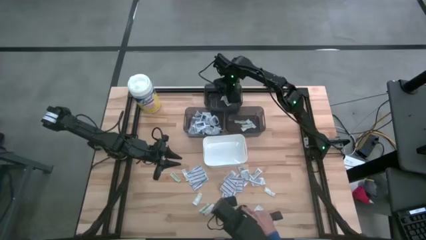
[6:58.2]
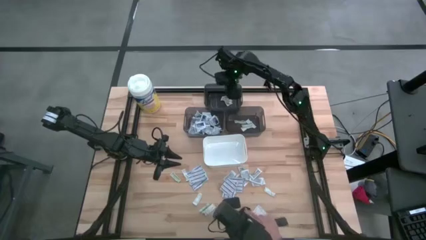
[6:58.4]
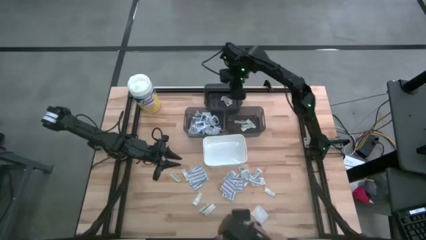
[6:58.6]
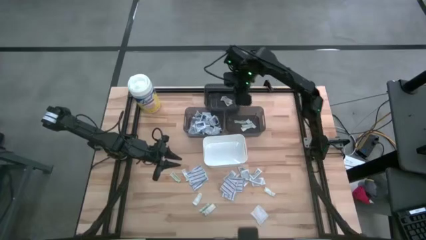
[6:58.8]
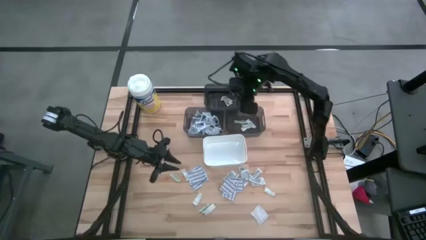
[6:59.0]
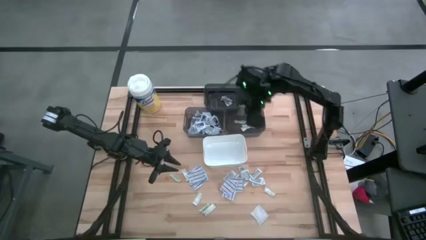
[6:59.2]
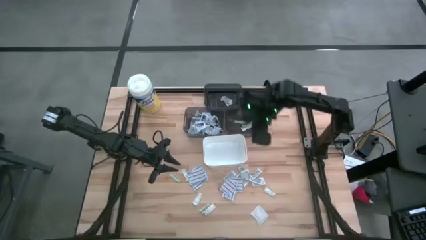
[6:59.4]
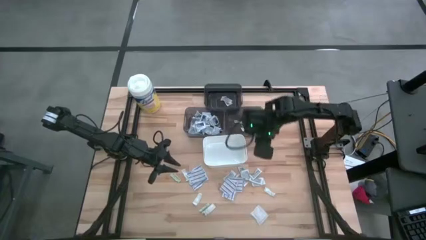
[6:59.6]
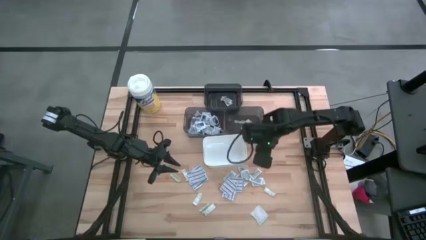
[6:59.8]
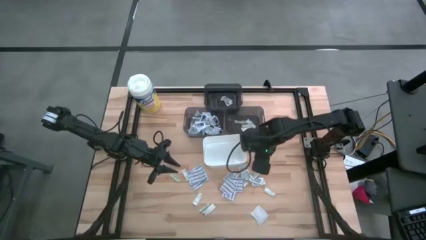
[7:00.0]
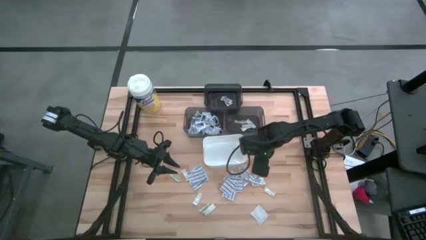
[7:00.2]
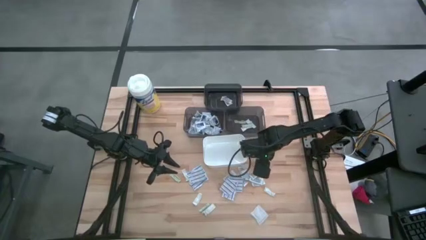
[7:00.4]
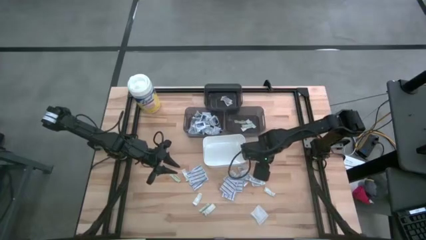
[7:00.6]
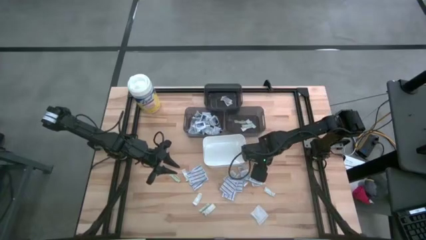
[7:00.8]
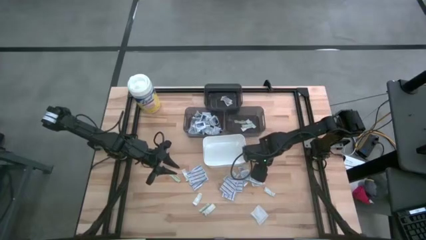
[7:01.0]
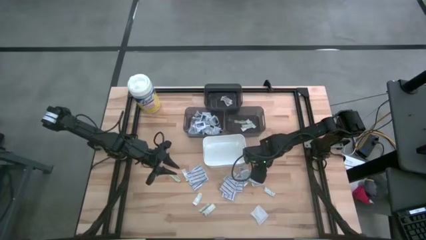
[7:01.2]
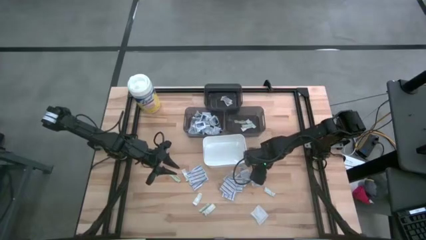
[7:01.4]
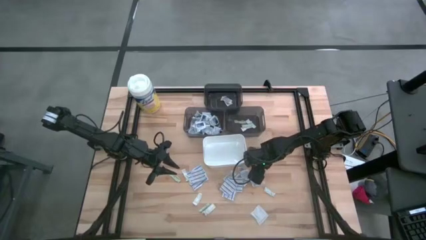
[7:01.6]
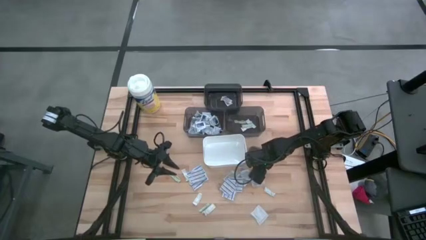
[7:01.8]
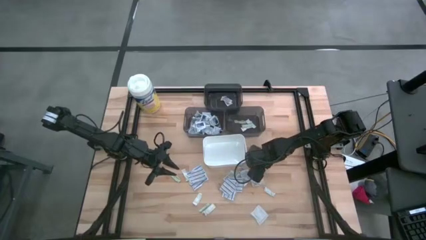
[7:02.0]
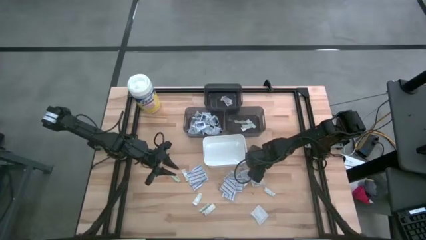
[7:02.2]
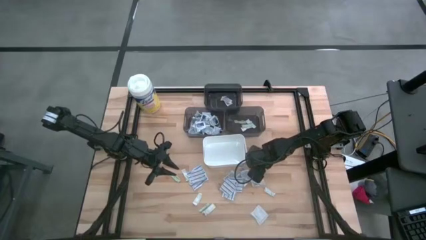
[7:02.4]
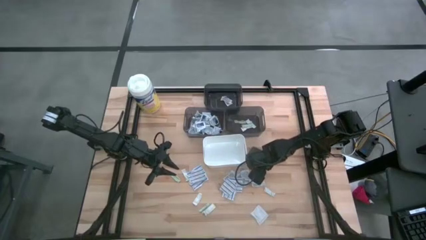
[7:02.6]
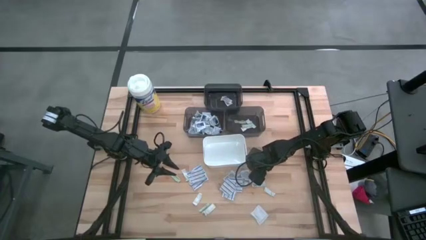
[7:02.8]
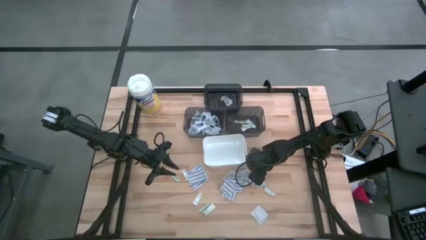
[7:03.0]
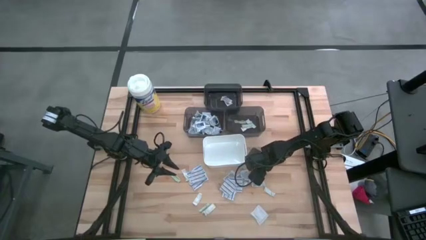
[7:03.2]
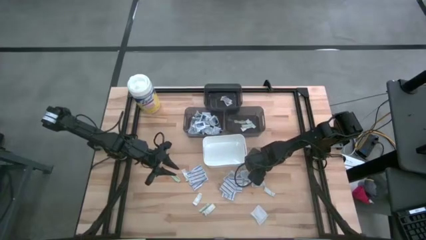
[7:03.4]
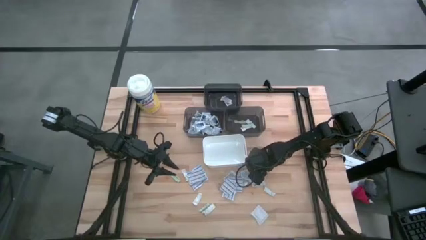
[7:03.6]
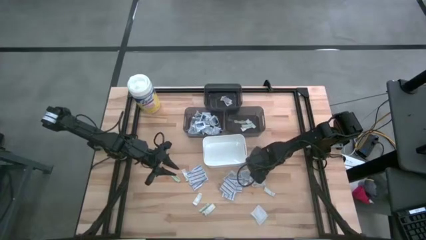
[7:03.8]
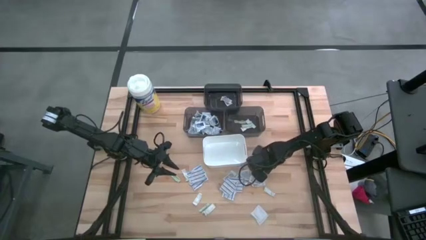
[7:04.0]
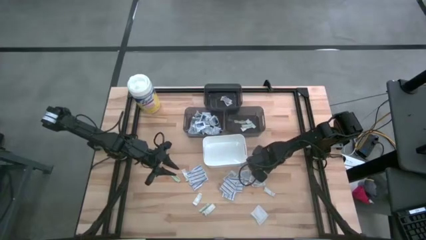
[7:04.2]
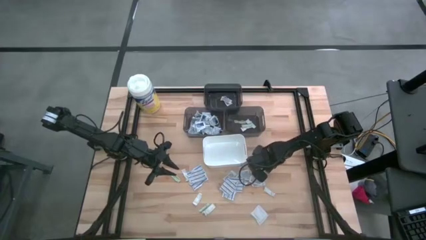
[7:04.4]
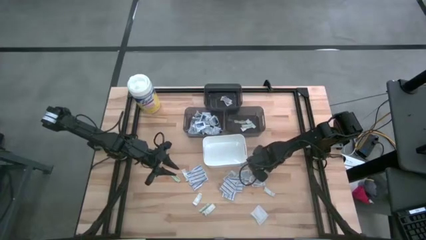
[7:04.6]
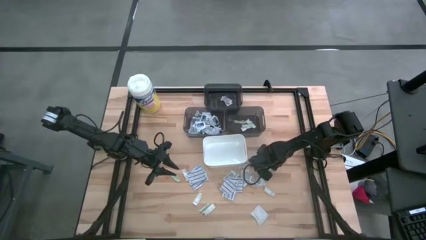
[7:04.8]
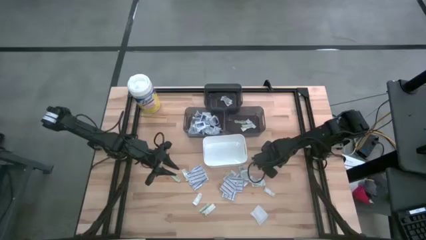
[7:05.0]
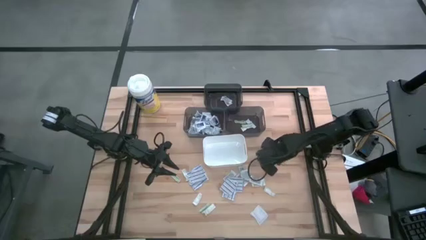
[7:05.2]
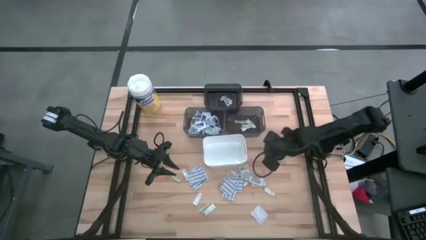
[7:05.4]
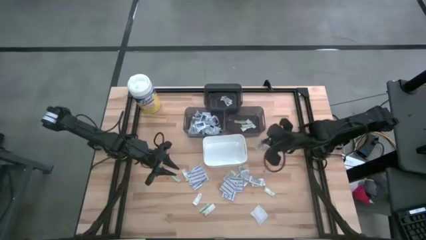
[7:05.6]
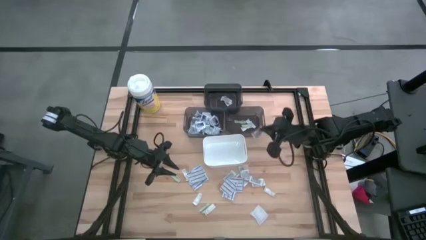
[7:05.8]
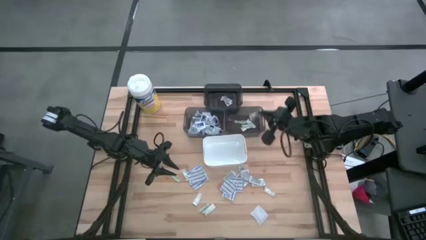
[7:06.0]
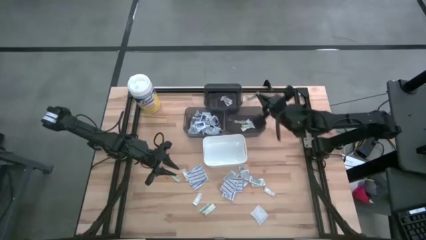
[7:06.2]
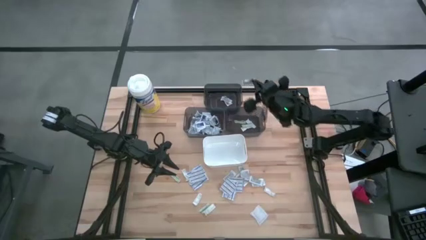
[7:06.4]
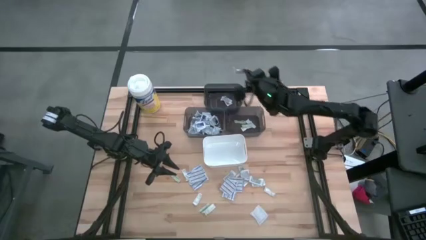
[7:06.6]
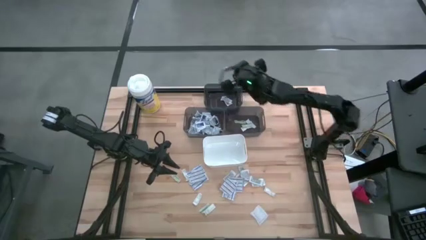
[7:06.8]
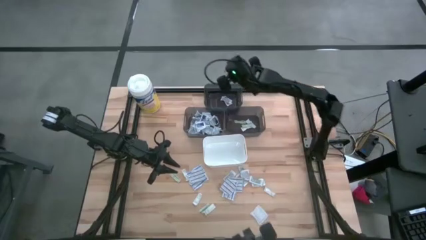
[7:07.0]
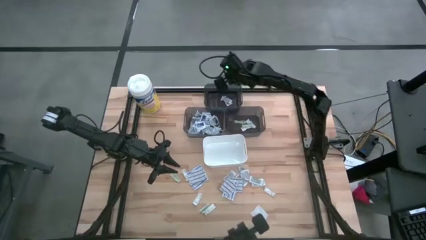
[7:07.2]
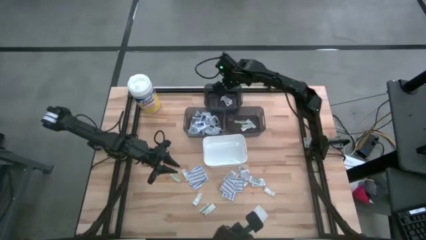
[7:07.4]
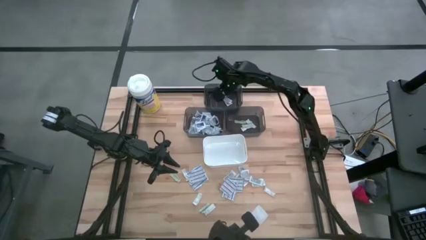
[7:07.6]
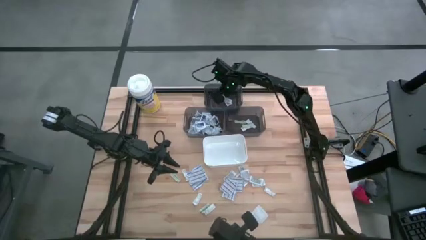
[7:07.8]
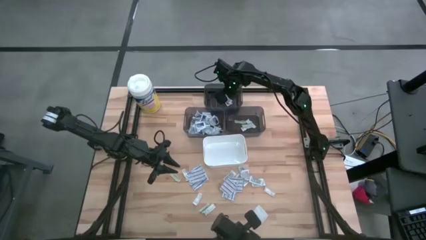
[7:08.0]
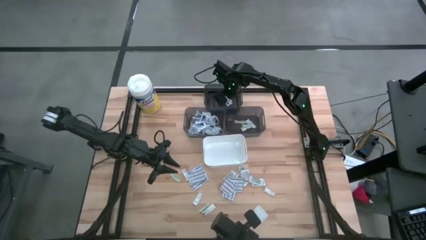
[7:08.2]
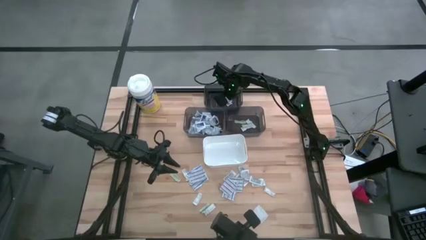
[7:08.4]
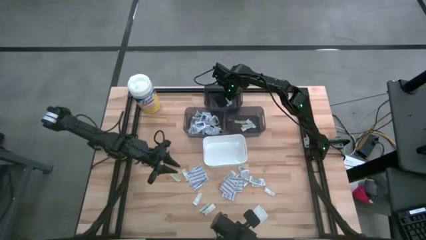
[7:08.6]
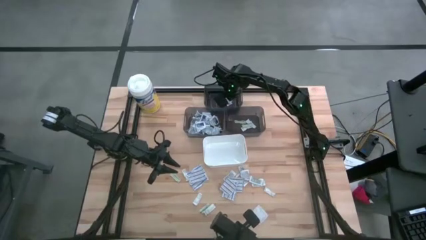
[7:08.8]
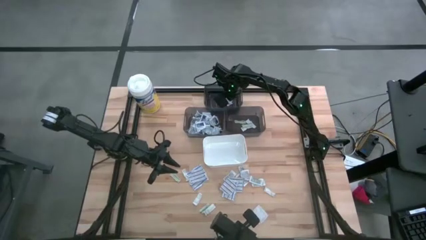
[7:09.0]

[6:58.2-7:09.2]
Task: Pick & Place First Aid Supplies
Put the ointment pack into the top black bin

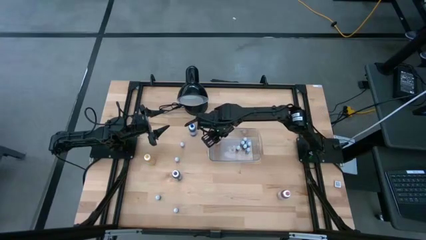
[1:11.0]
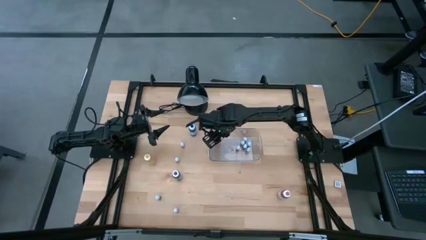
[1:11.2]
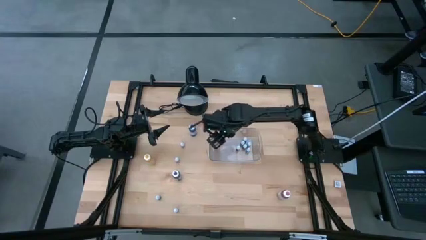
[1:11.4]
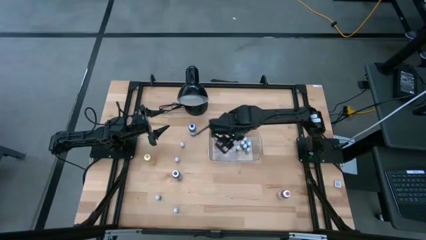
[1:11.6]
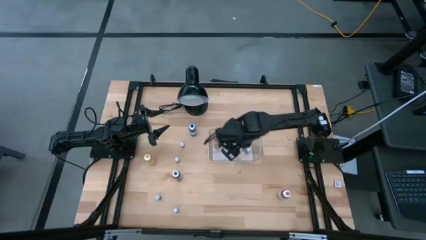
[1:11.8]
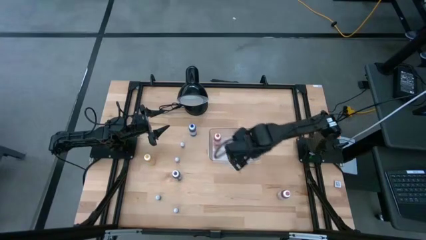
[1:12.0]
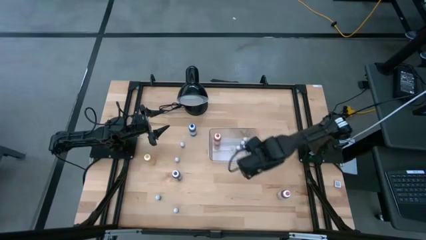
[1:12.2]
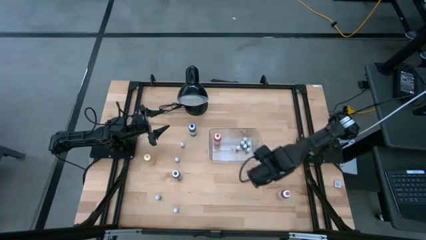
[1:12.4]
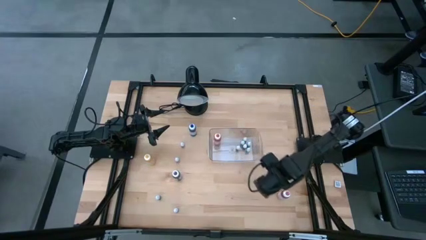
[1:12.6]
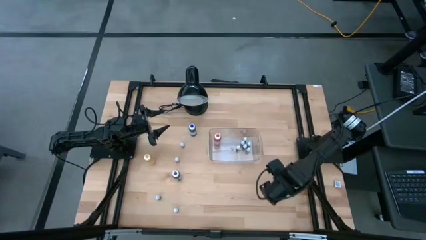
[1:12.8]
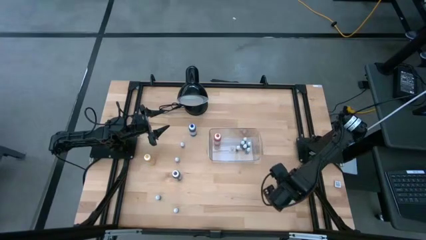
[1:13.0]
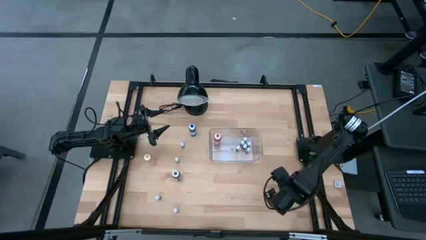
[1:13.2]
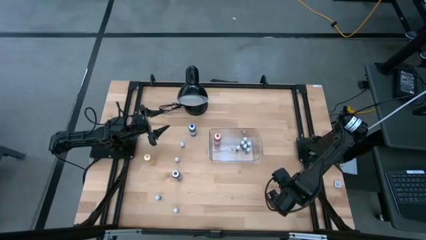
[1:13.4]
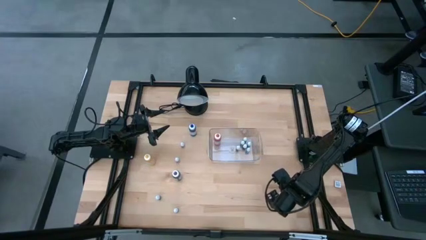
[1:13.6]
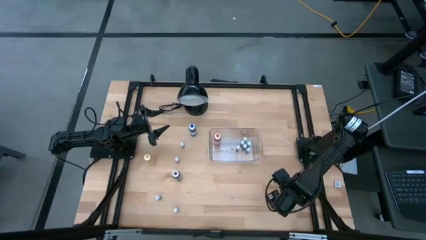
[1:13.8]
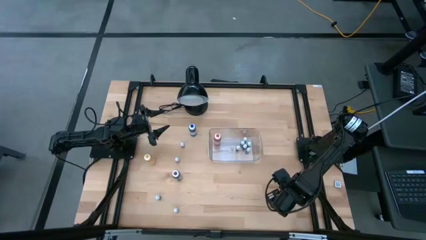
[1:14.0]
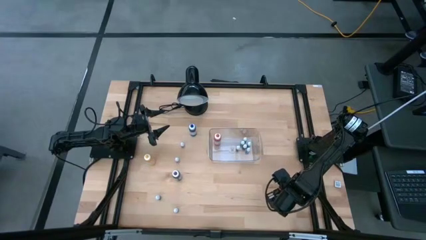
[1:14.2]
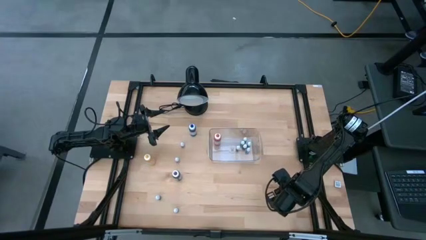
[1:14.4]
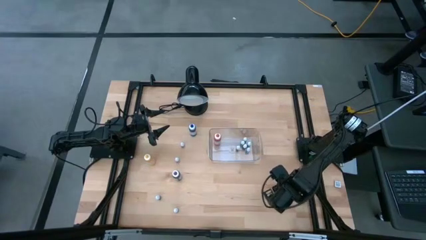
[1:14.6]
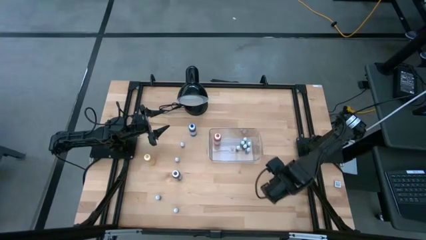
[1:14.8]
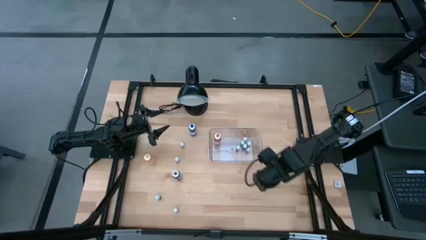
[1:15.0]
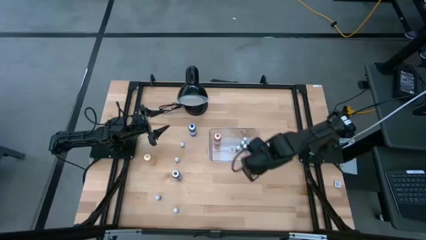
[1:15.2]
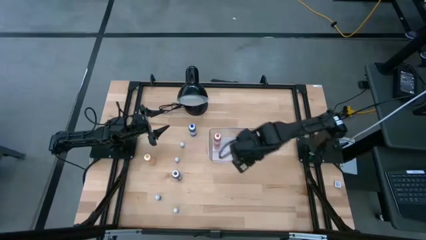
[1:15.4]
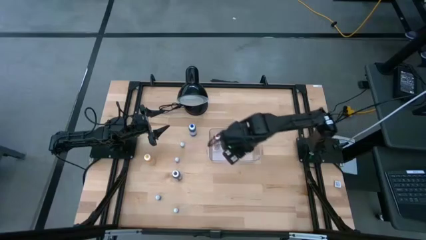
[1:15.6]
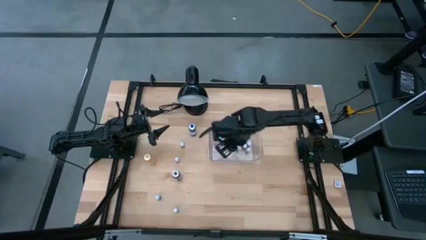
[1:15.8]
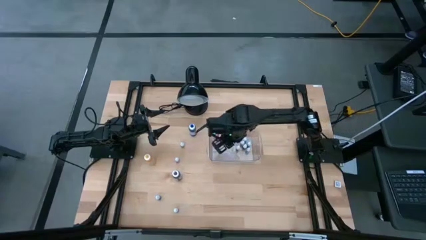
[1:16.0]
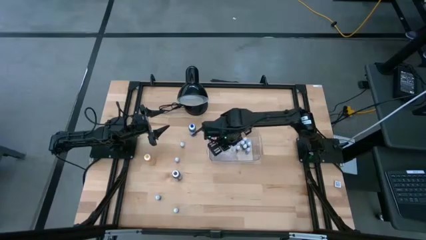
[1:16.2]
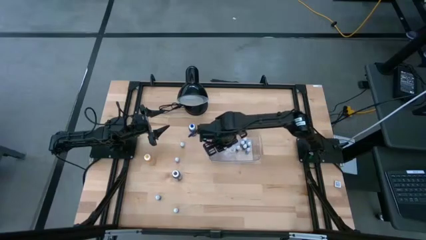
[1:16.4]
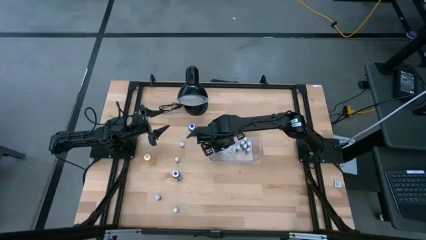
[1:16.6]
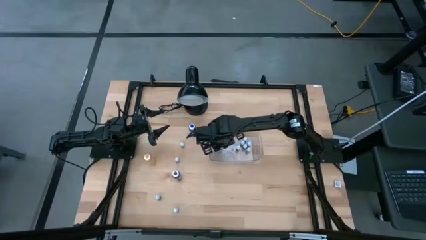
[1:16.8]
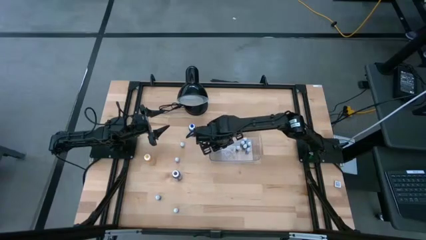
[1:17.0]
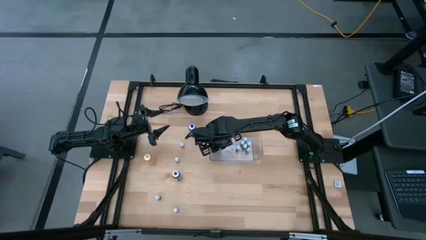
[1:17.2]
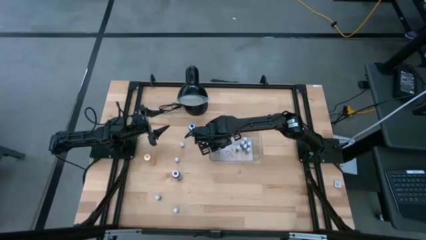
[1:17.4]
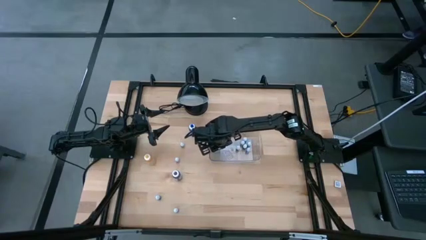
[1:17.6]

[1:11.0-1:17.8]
Task: Pick & Place food coloring
Put the big pink food coloring bottle into the transparent bin
